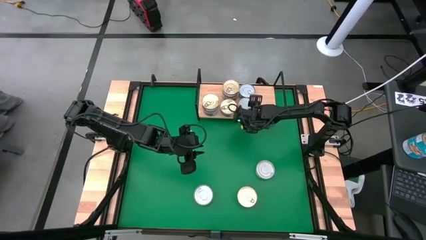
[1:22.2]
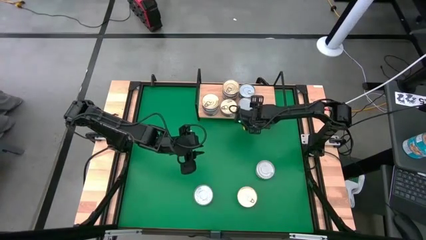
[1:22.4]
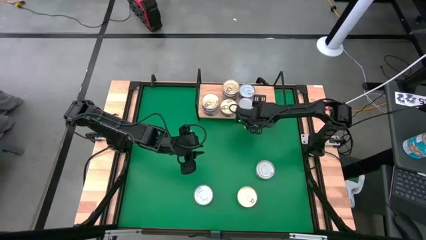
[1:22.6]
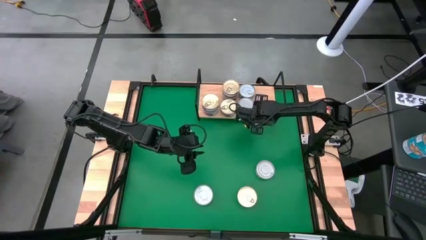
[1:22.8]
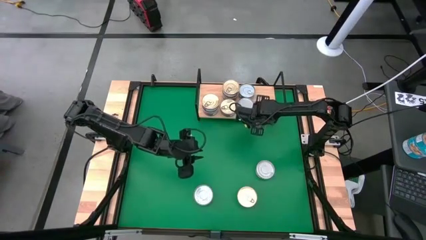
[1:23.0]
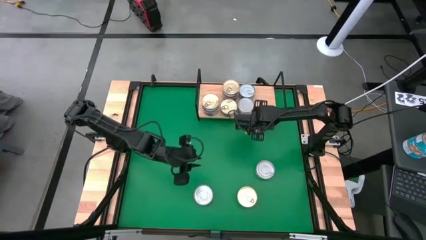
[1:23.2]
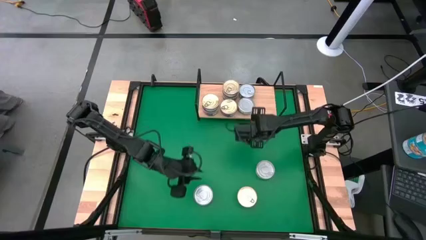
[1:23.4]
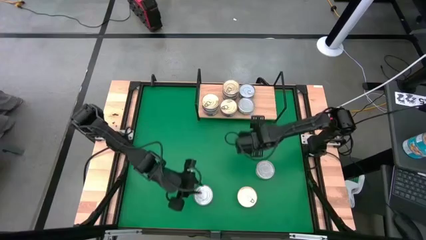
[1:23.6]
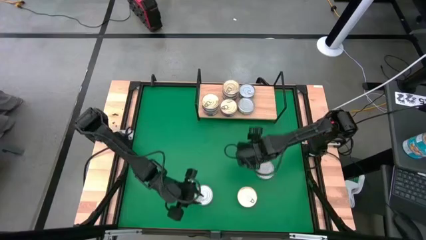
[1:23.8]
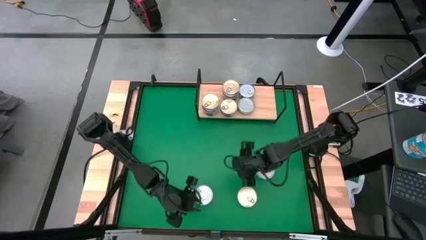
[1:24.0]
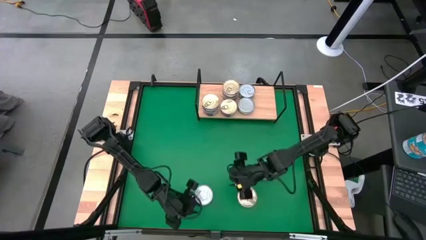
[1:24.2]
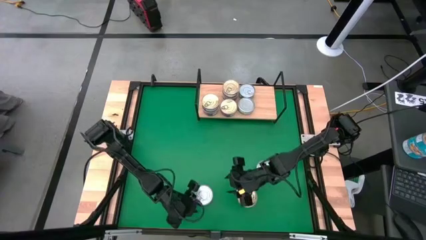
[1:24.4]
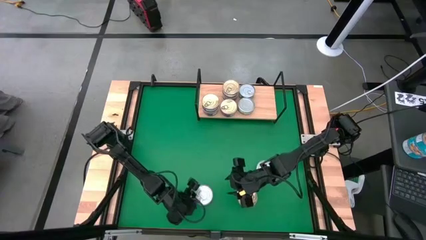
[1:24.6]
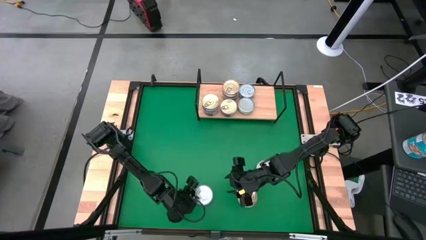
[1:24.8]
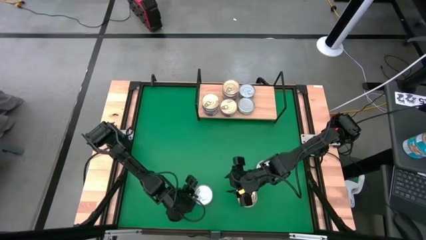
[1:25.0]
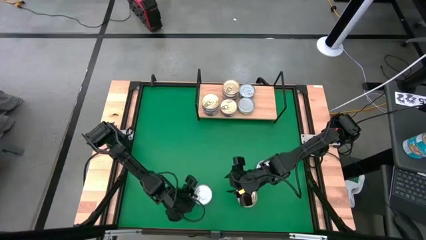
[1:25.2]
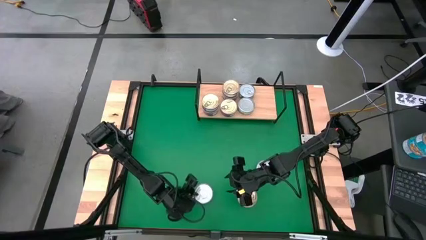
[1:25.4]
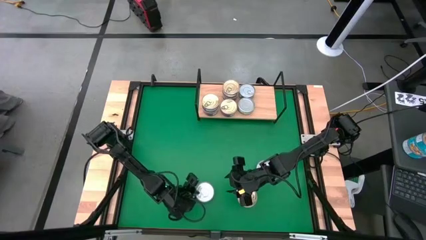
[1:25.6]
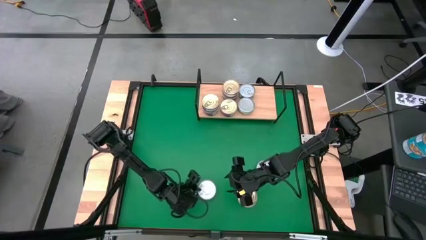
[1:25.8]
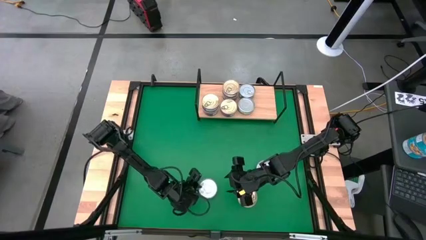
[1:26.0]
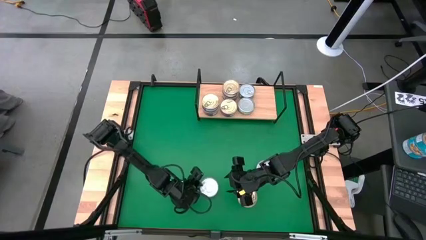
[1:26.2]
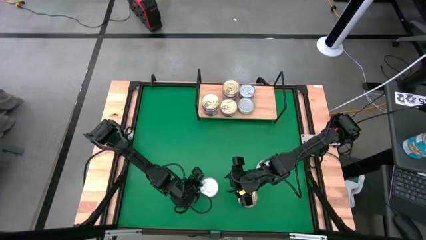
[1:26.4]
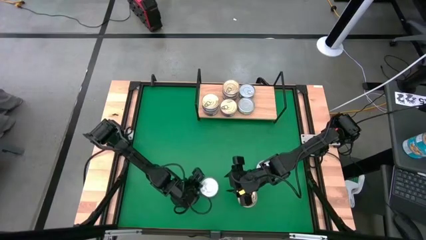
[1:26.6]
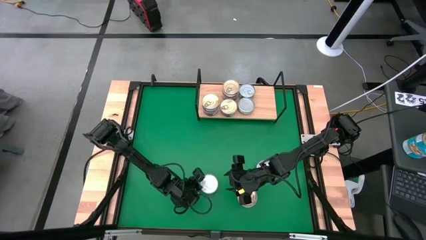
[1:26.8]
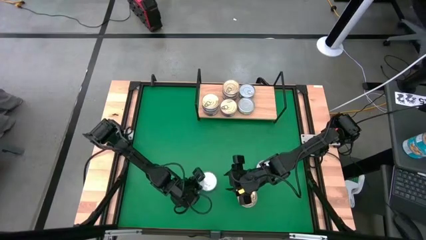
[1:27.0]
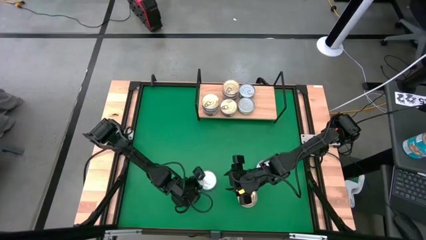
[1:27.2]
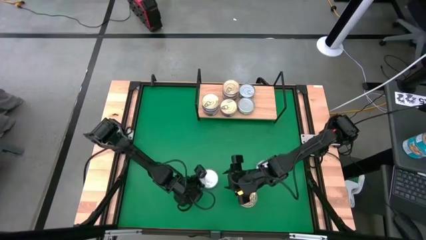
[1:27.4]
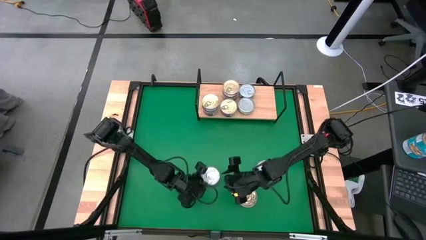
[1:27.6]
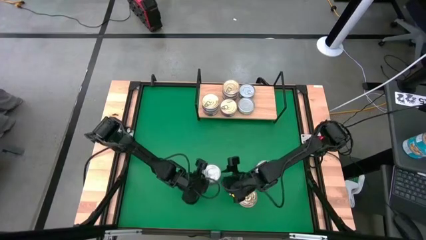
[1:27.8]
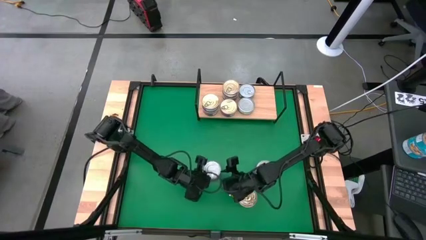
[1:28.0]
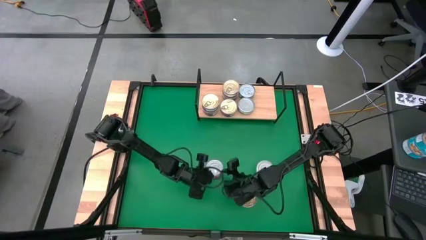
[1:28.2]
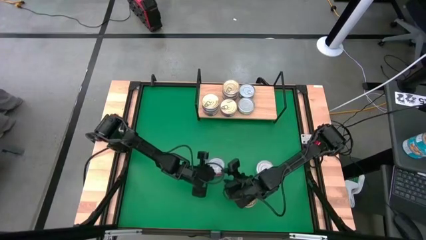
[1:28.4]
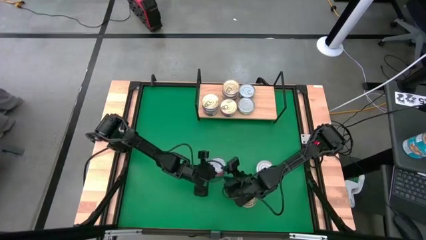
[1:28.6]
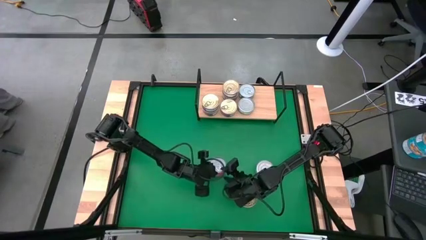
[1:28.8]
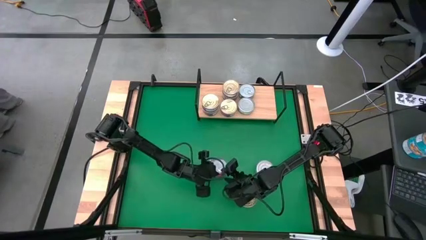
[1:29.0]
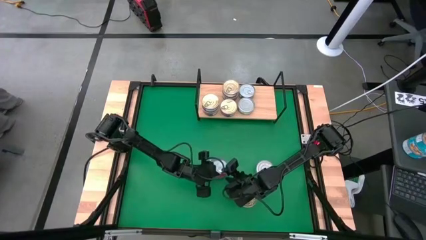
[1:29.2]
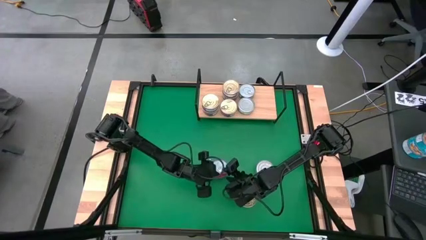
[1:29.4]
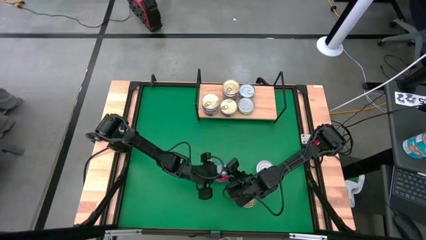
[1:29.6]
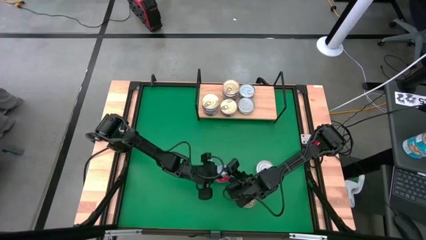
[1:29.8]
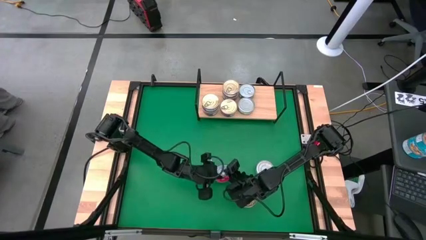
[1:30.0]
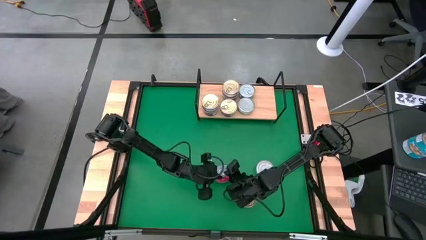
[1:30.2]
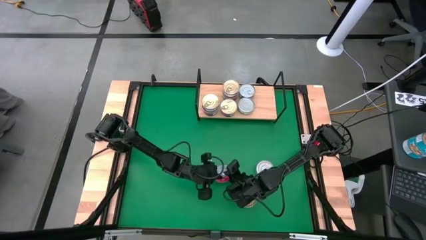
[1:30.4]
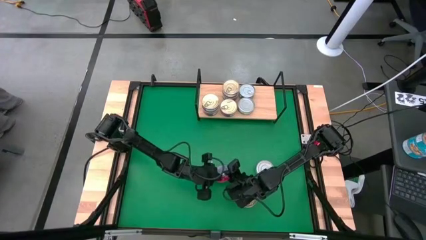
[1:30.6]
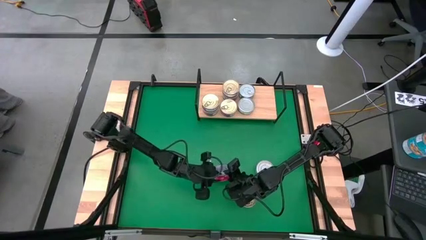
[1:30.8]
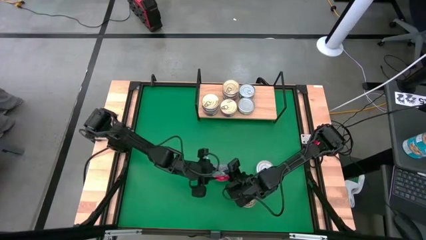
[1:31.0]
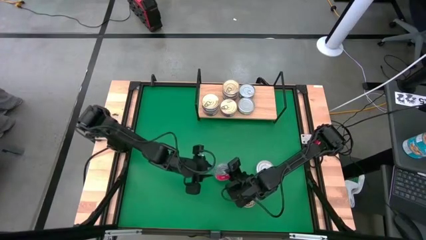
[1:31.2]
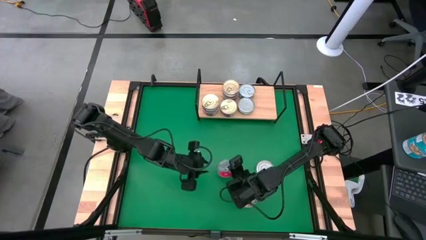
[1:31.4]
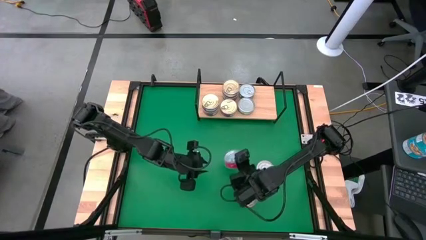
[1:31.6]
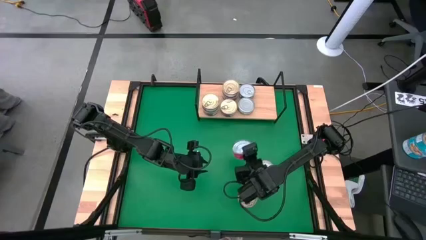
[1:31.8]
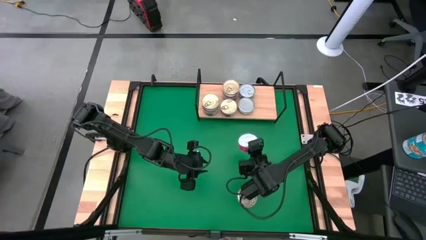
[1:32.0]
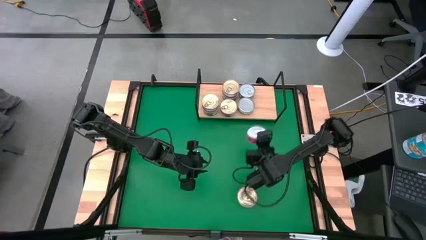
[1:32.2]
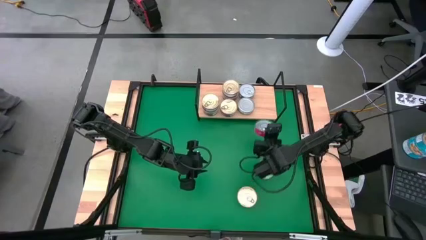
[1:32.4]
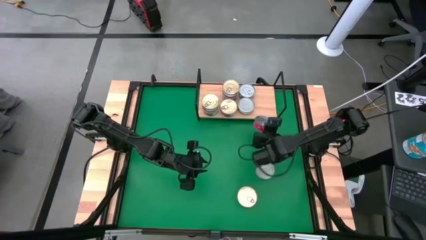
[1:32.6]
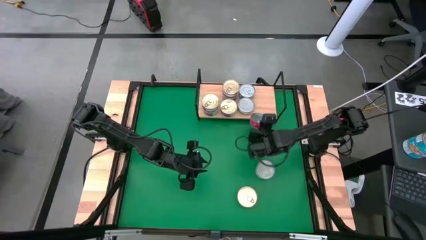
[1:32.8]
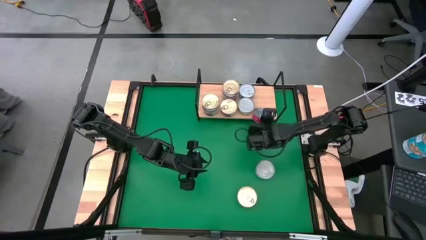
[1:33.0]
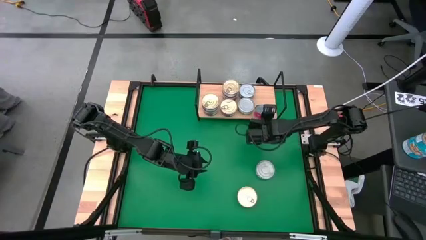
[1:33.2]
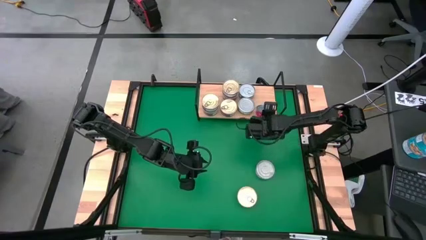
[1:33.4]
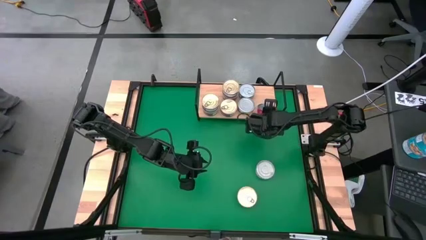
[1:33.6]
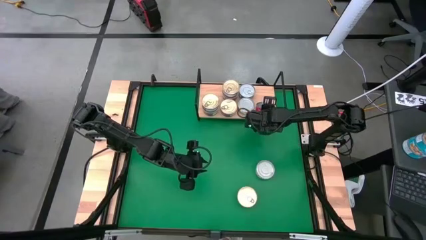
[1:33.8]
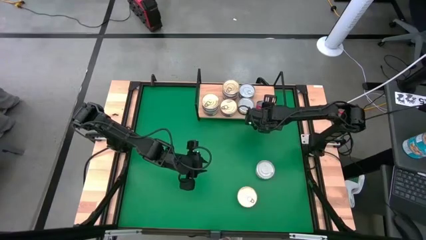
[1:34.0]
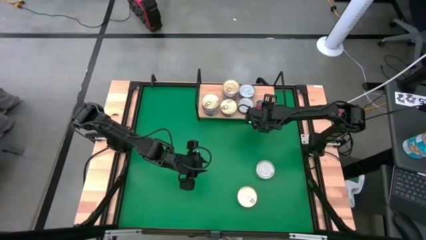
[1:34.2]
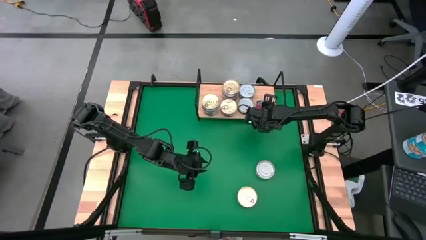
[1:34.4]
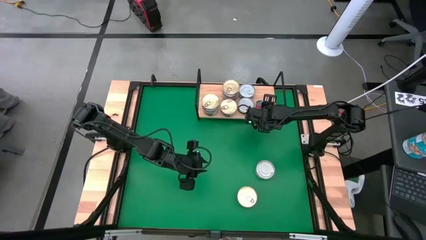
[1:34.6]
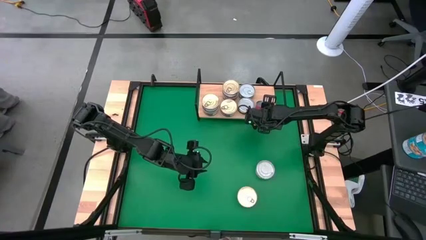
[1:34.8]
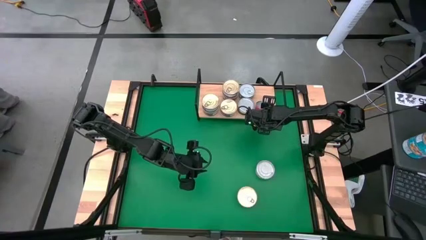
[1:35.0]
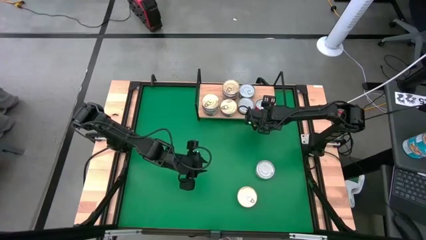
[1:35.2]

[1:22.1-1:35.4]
Task: Stack canned seafood by type on shelf
Put the red tuna can on the shelf aligned with the green tuna can

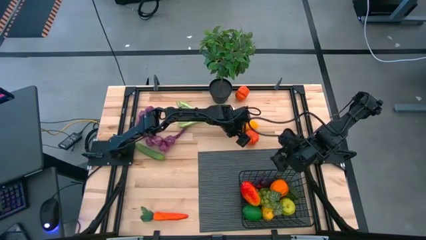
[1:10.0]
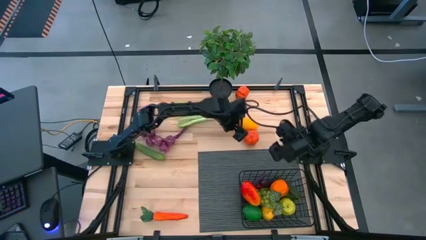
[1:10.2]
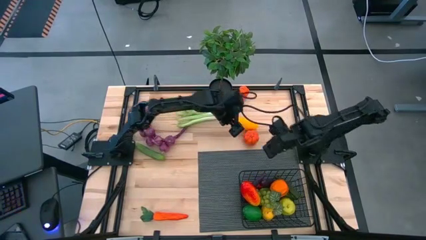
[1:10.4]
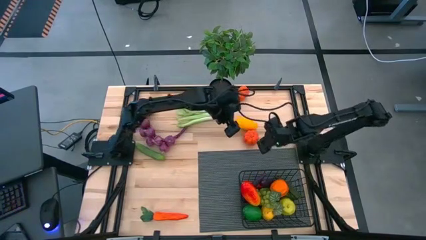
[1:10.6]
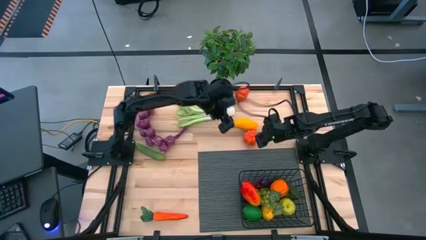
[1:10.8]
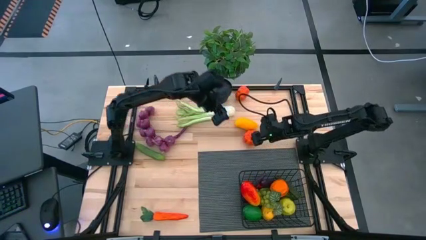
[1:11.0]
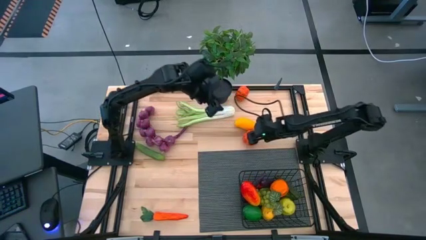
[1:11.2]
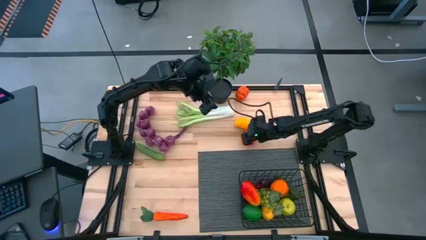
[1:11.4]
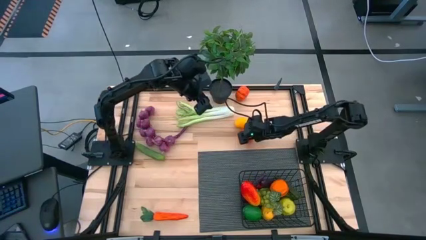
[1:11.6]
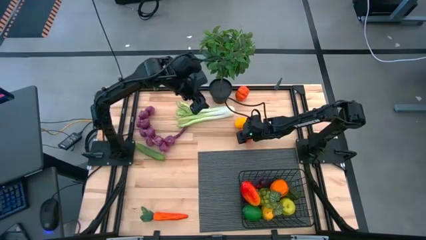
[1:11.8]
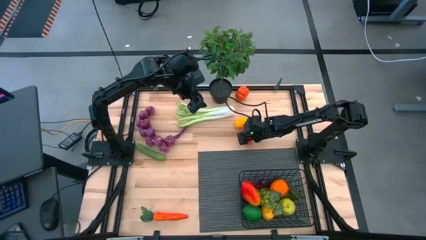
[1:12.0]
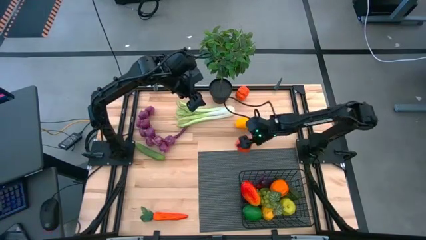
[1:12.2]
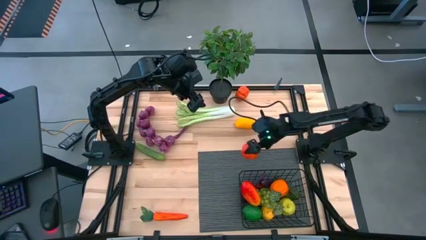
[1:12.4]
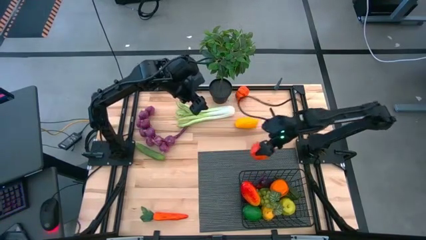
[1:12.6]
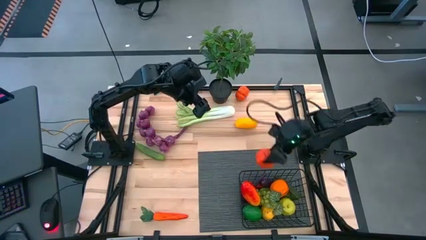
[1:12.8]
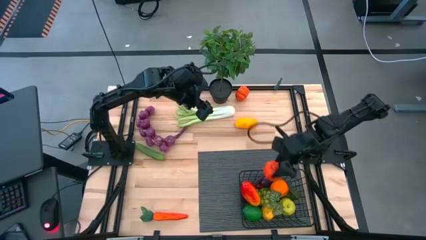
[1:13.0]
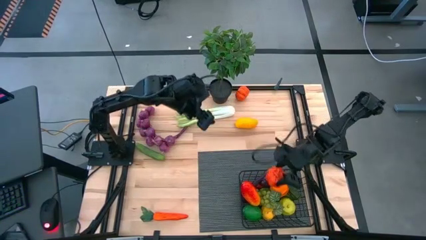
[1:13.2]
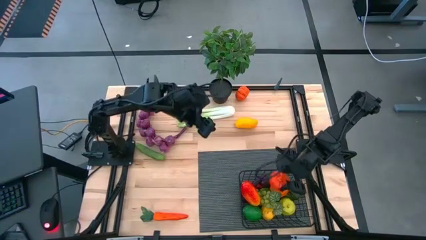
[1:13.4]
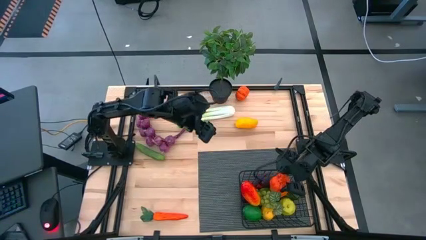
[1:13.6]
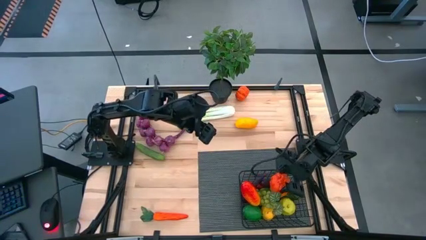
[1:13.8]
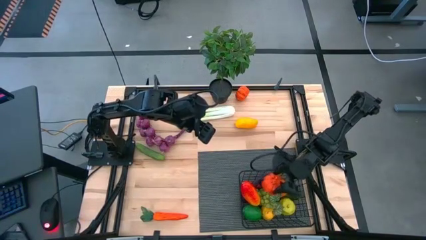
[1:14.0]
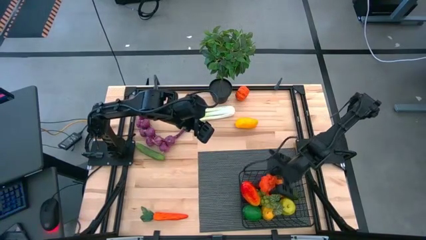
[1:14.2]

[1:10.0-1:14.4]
Task: Build produce basket
Put the bottom orange pumpkin into the black wire basket
